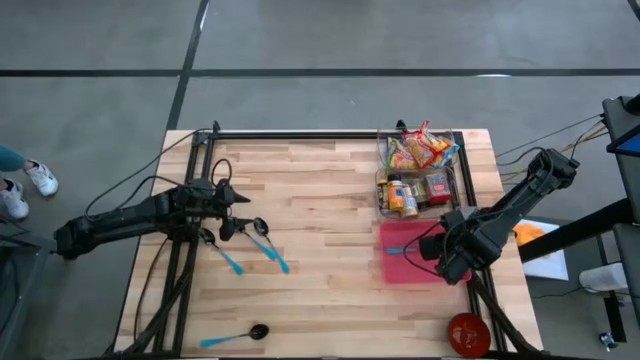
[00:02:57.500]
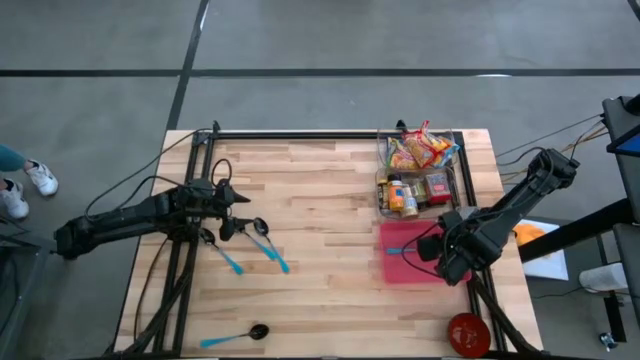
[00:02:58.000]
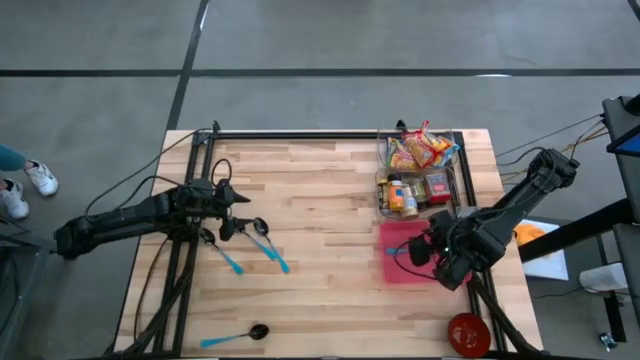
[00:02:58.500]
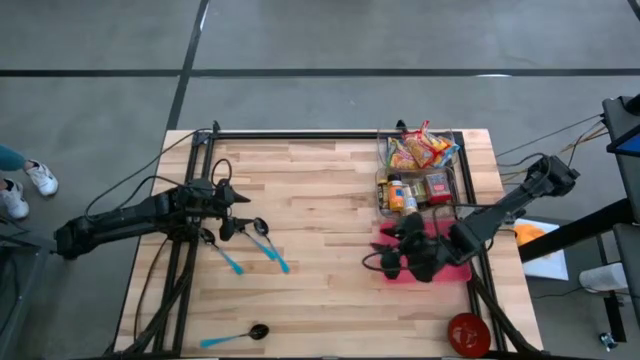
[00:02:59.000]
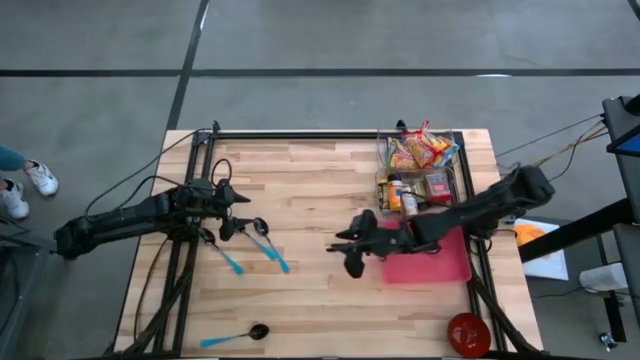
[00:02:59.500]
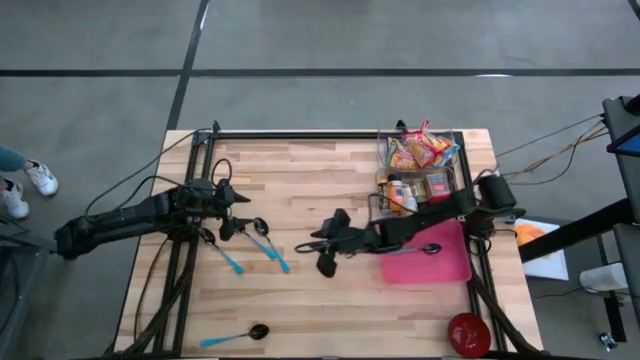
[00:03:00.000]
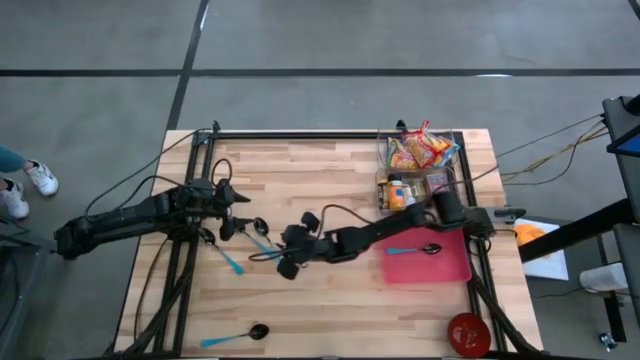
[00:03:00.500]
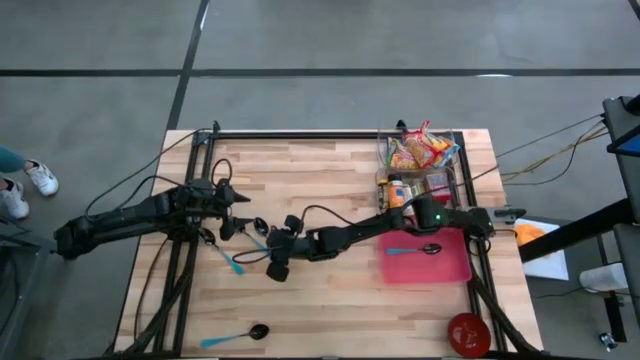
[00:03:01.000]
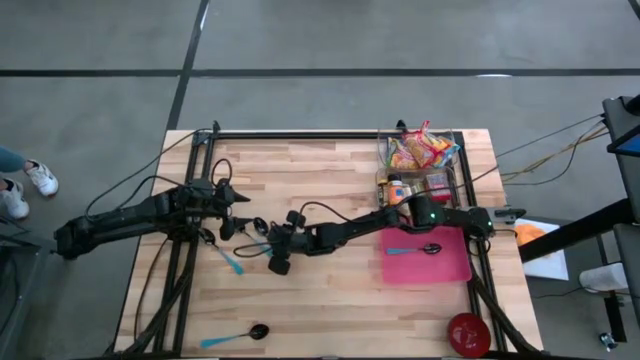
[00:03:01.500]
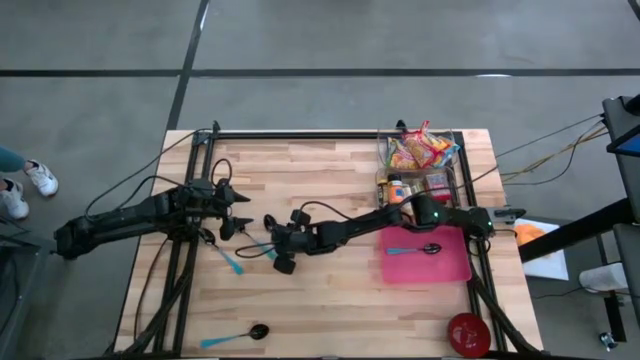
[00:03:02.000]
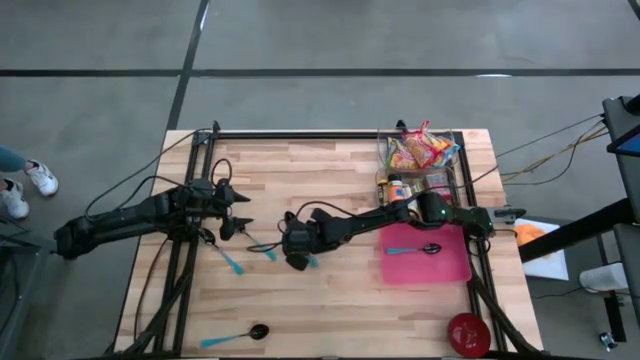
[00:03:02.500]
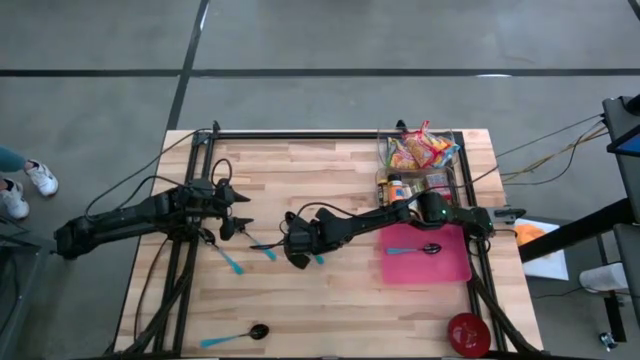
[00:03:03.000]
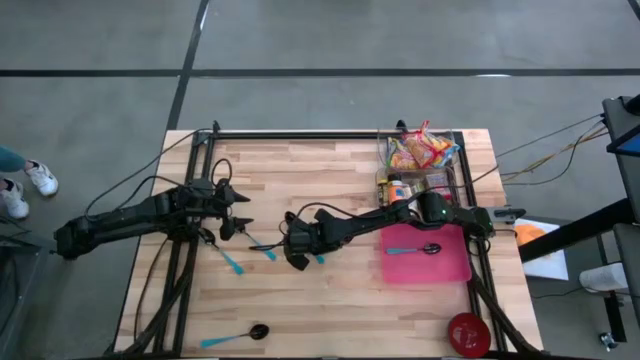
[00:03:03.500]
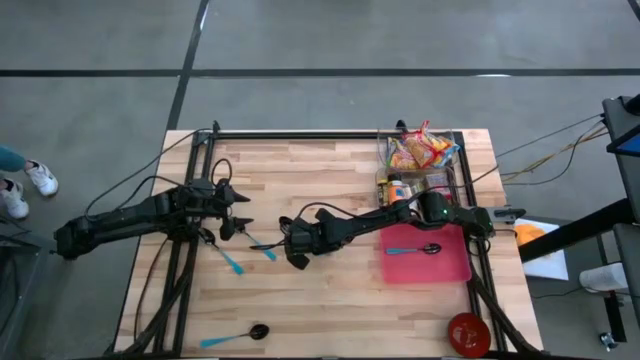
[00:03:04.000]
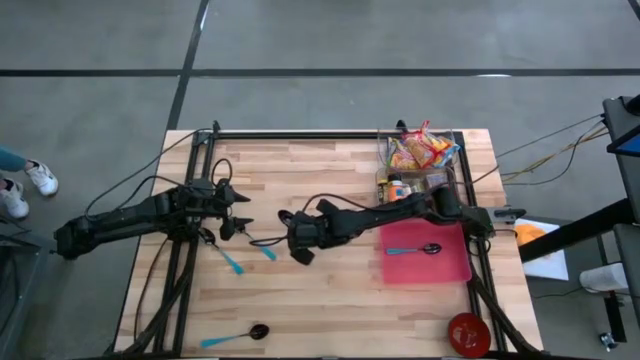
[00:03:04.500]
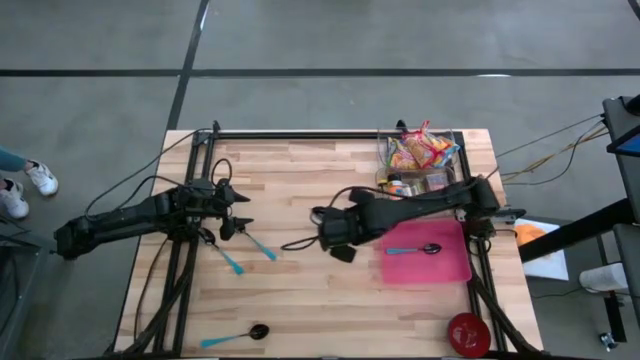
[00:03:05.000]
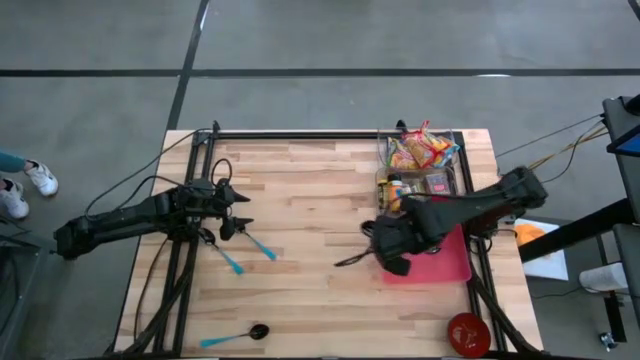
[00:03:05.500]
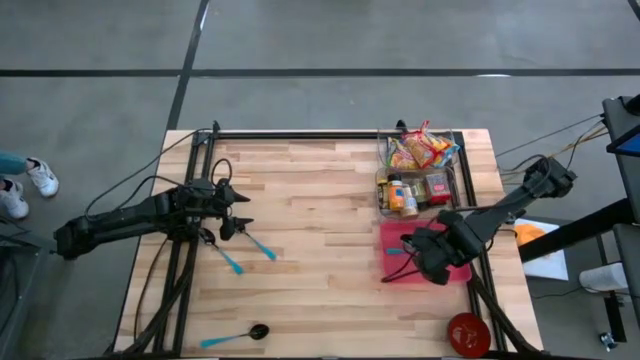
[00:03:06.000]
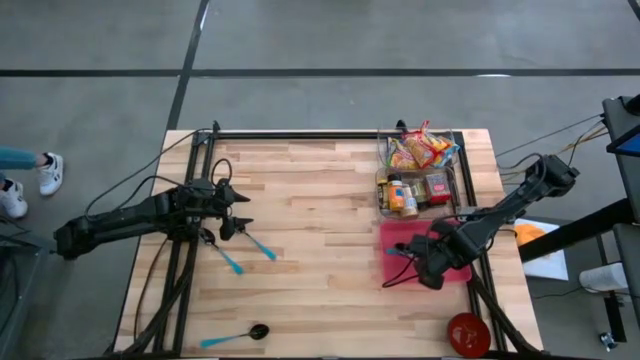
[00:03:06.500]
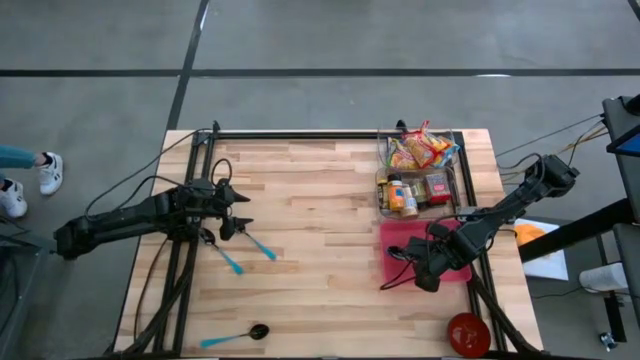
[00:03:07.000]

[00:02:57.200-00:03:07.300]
Put the blue spoon into the red bin

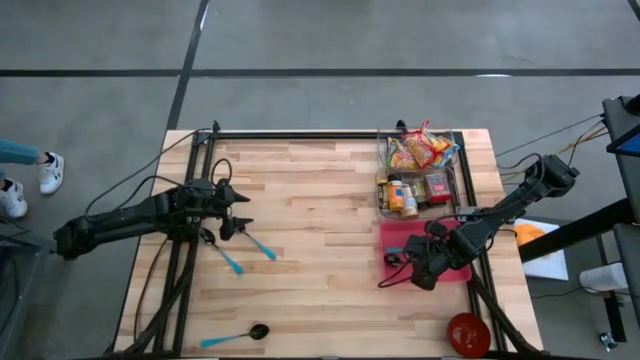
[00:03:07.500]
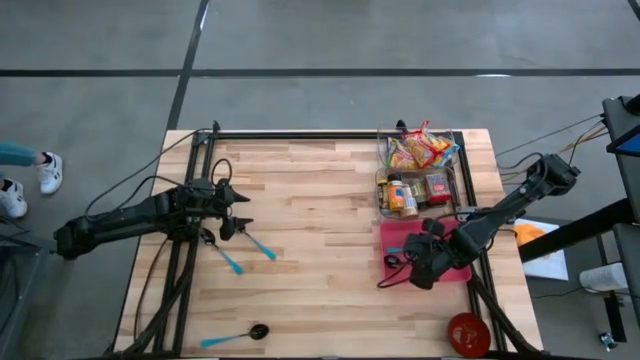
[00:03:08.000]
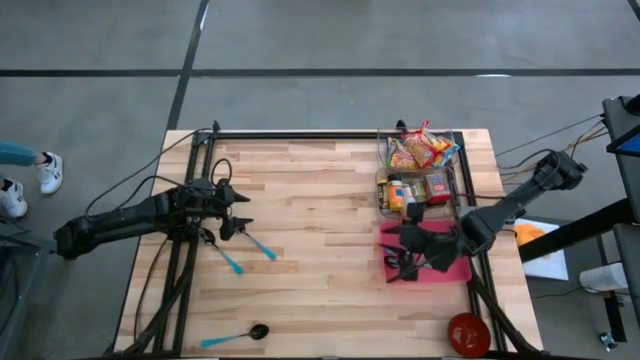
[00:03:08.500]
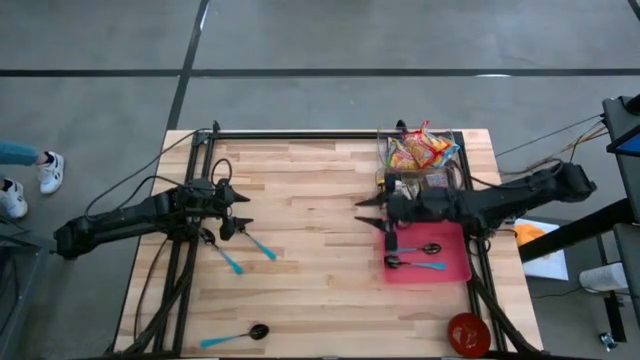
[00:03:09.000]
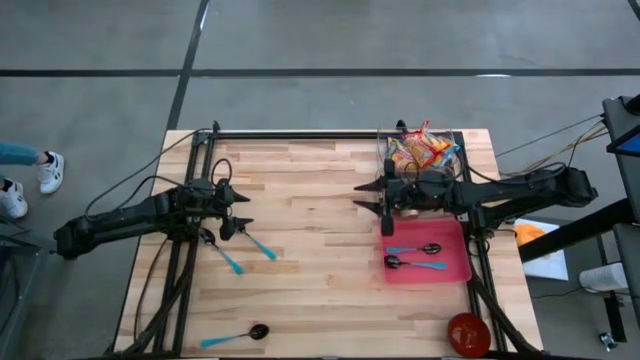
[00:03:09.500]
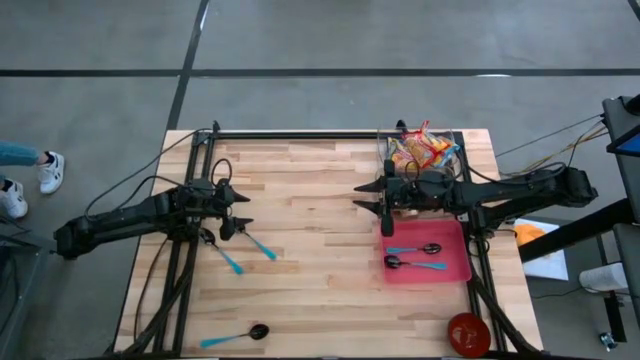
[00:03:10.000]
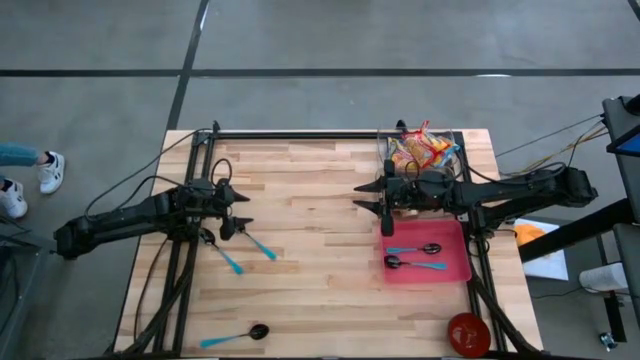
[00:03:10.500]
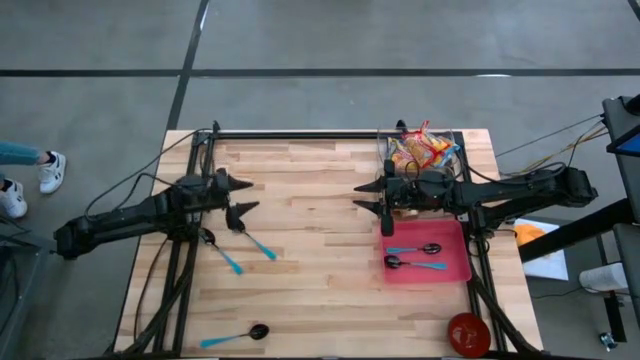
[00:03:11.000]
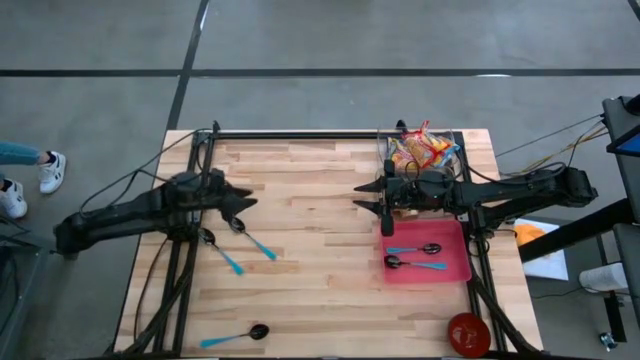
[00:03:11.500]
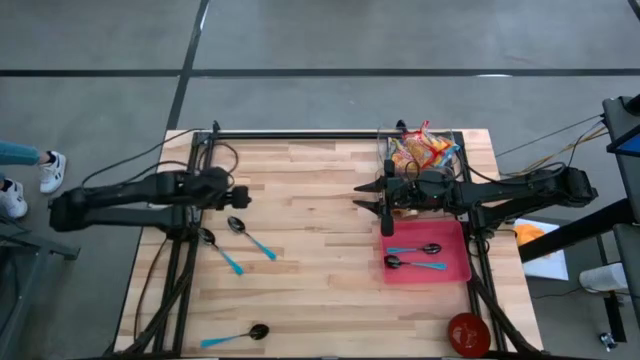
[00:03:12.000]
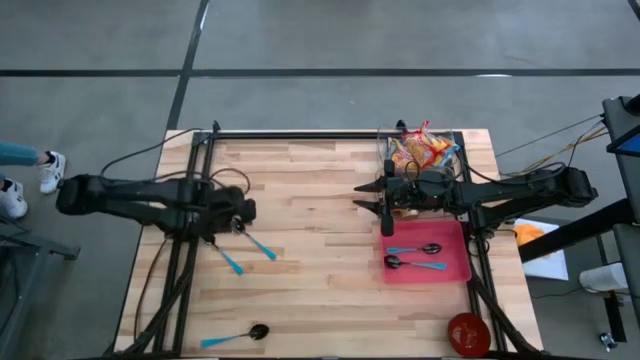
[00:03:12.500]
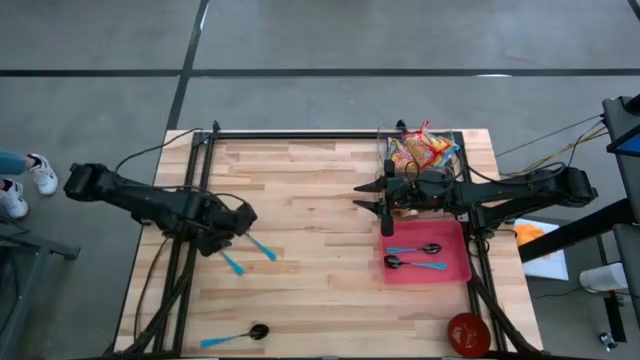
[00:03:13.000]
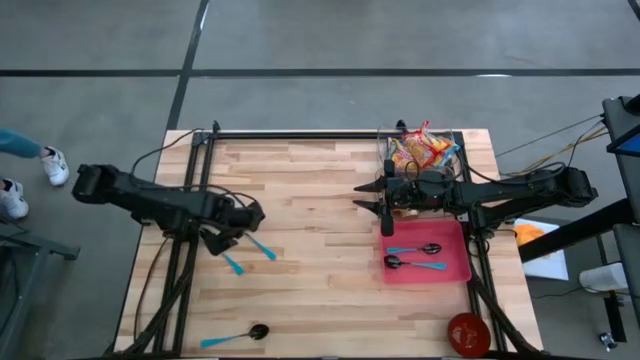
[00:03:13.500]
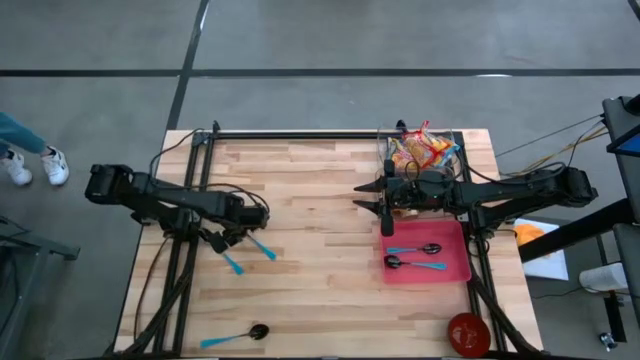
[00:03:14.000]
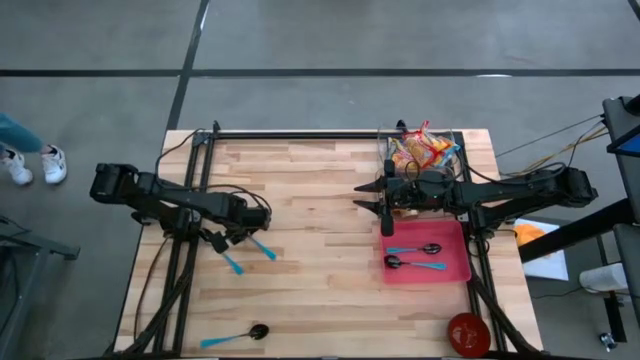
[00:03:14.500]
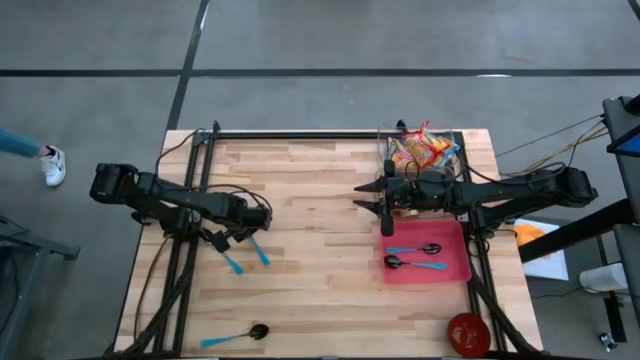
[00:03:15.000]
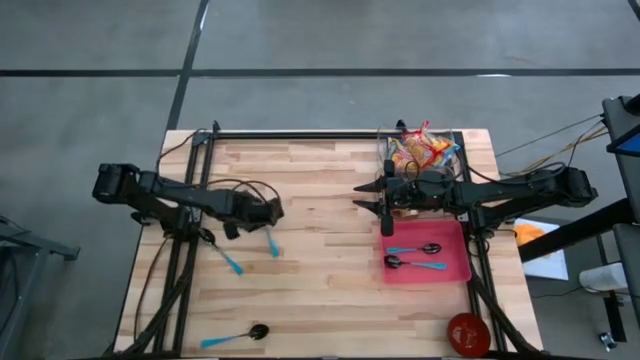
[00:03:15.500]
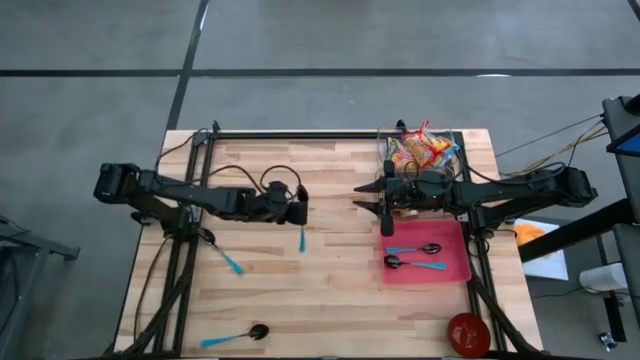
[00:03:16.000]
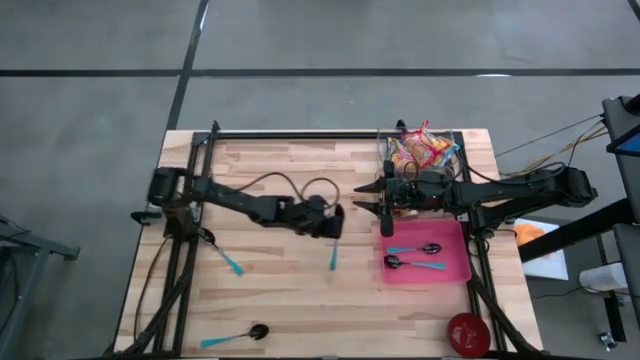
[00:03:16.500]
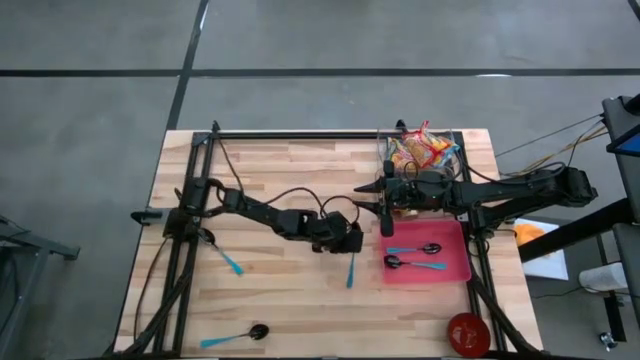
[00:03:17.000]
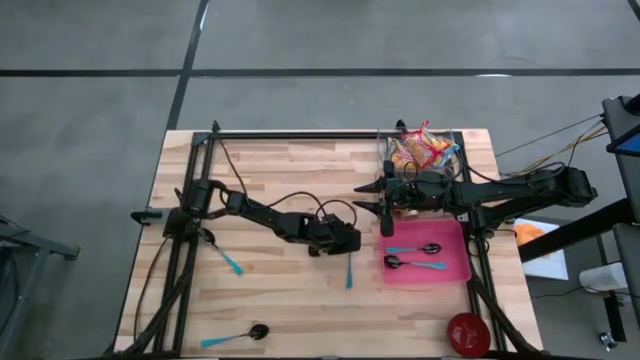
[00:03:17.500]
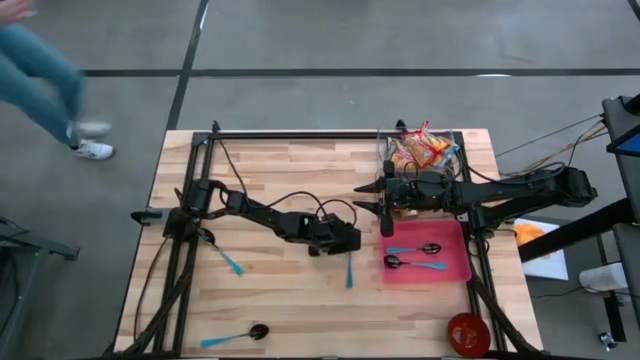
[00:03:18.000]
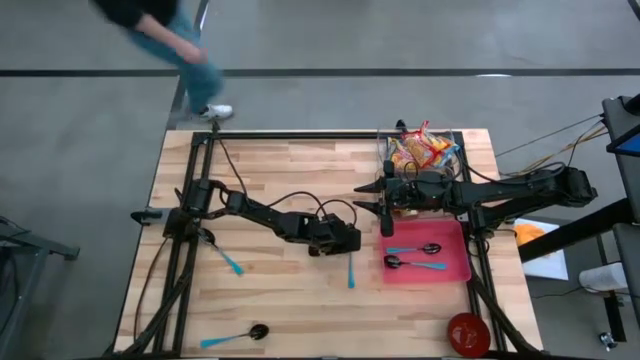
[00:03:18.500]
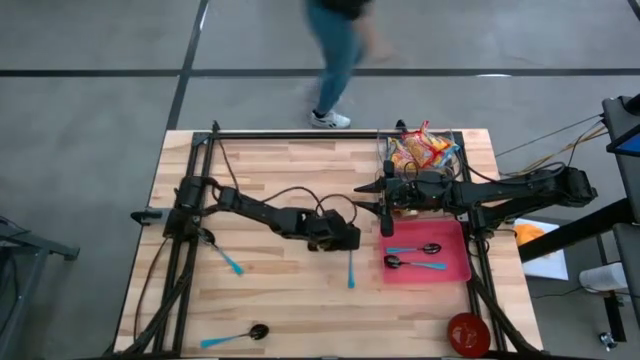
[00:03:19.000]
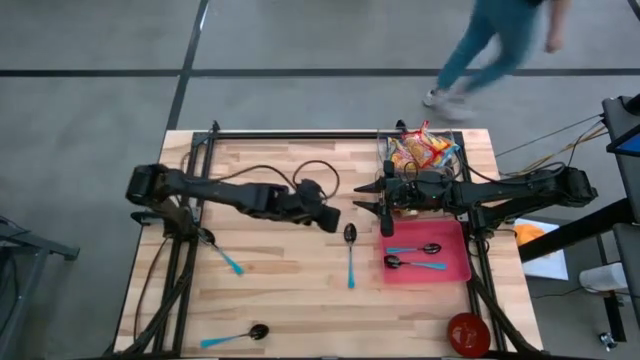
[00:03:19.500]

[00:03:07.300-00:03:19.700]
Put the blue spoon into the red bin
